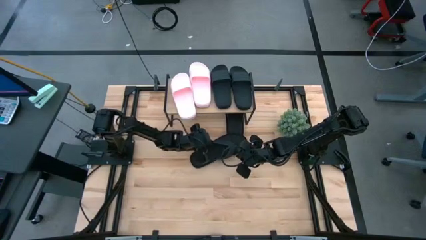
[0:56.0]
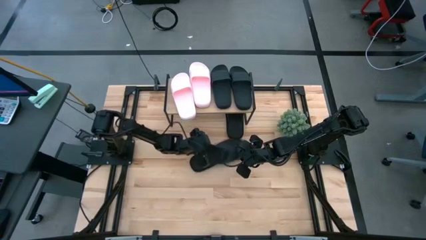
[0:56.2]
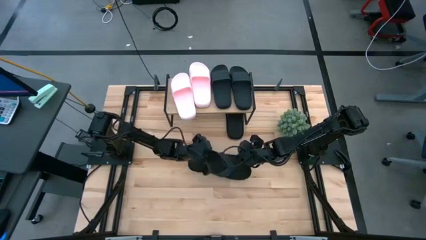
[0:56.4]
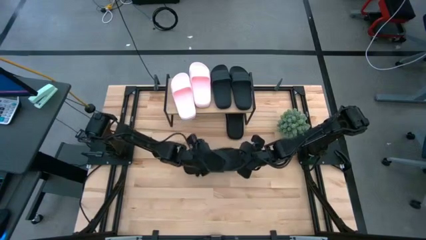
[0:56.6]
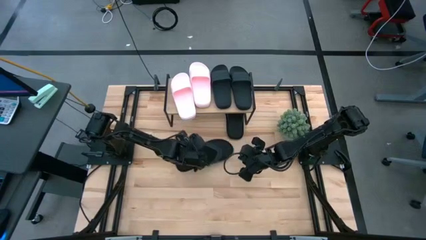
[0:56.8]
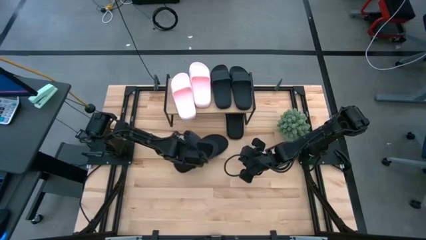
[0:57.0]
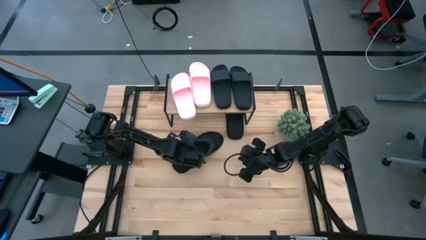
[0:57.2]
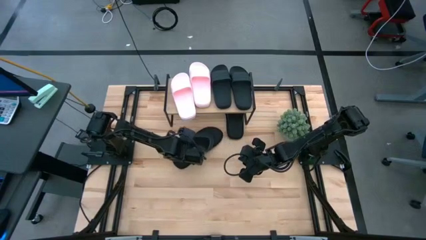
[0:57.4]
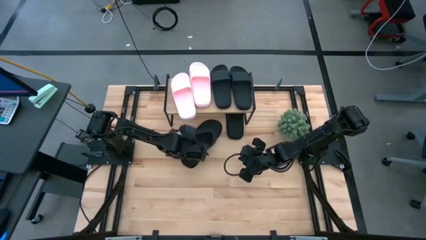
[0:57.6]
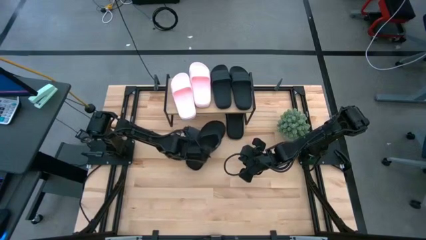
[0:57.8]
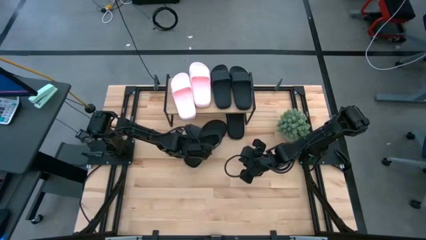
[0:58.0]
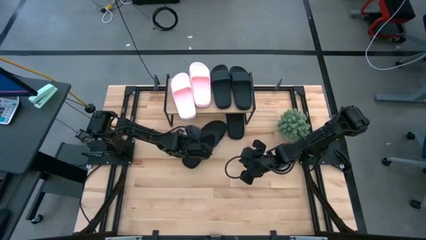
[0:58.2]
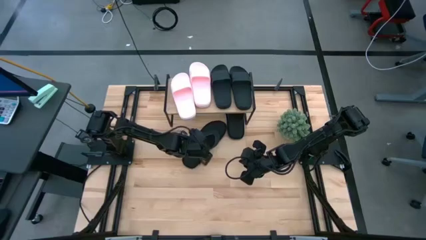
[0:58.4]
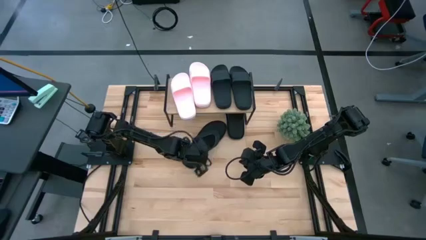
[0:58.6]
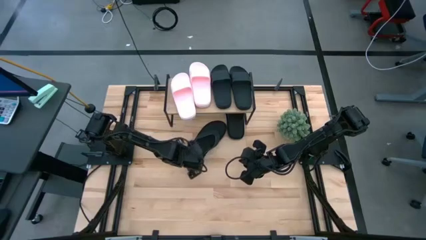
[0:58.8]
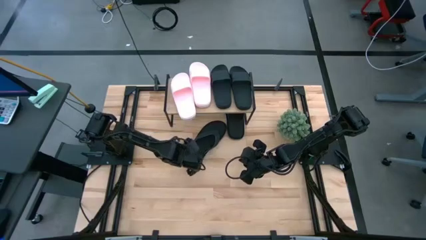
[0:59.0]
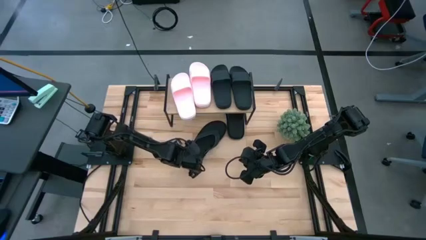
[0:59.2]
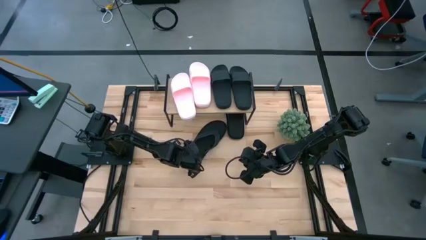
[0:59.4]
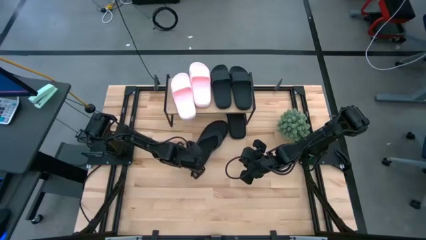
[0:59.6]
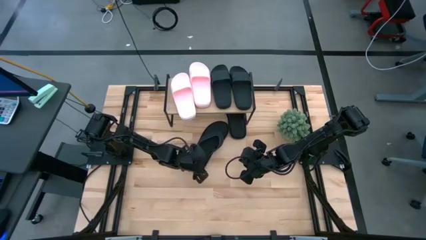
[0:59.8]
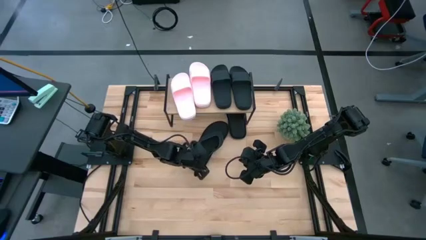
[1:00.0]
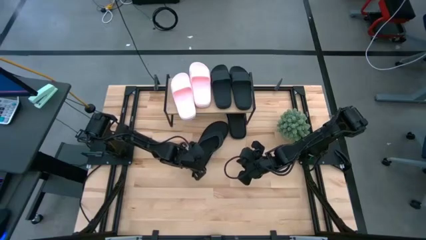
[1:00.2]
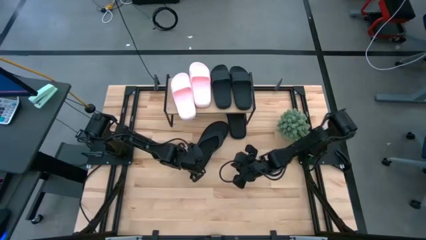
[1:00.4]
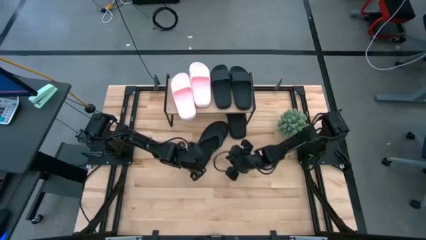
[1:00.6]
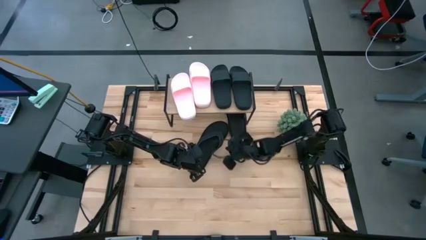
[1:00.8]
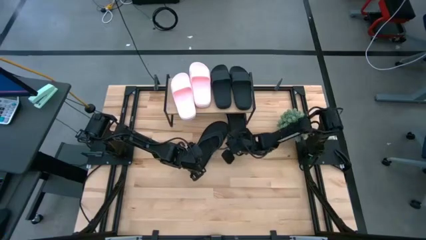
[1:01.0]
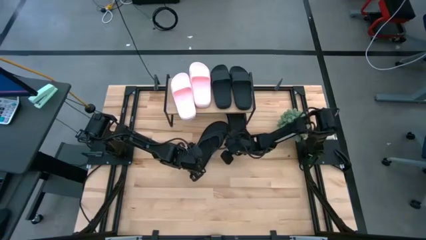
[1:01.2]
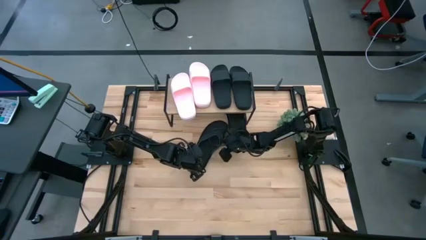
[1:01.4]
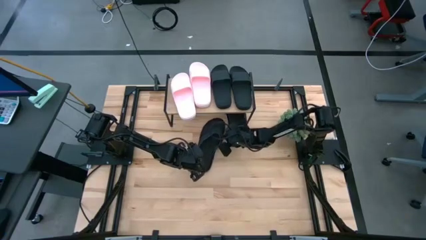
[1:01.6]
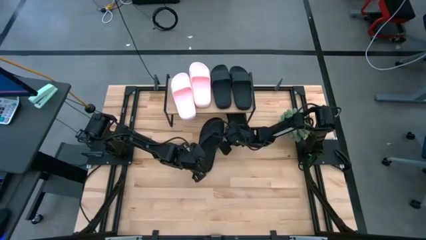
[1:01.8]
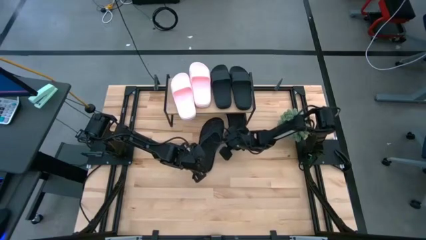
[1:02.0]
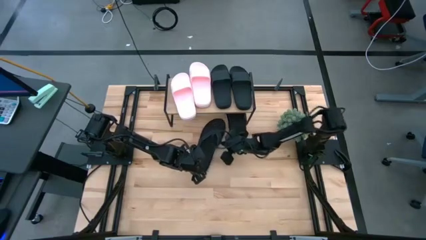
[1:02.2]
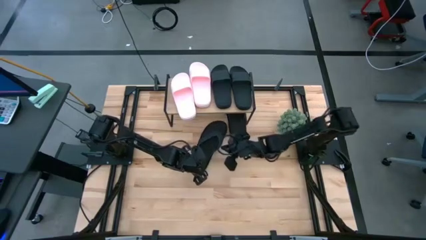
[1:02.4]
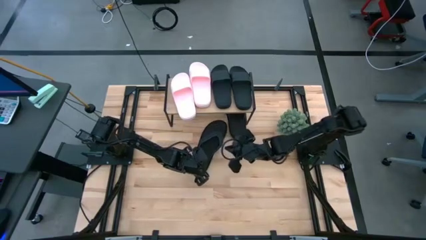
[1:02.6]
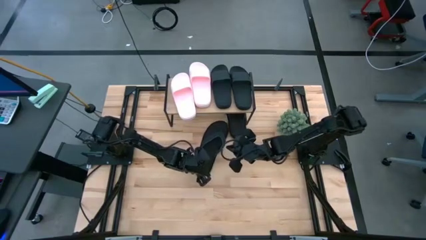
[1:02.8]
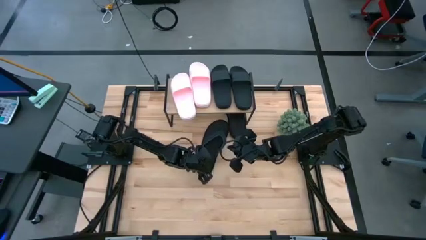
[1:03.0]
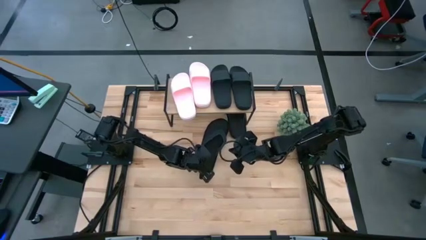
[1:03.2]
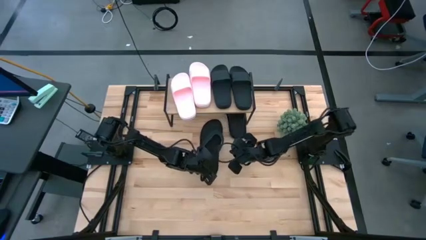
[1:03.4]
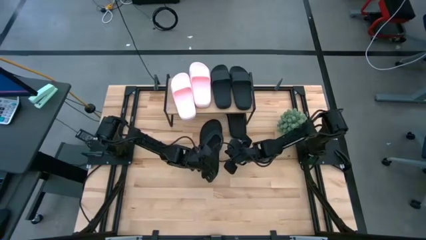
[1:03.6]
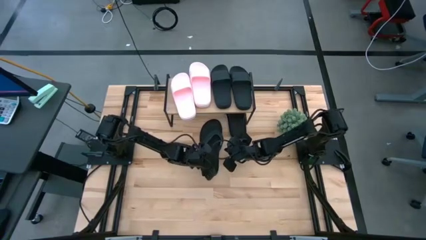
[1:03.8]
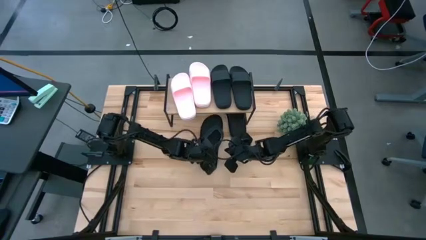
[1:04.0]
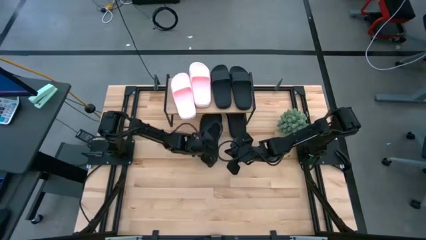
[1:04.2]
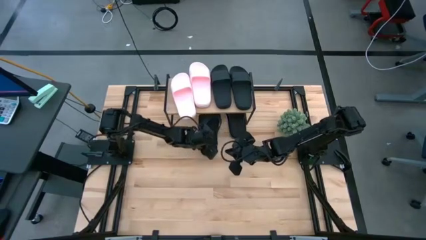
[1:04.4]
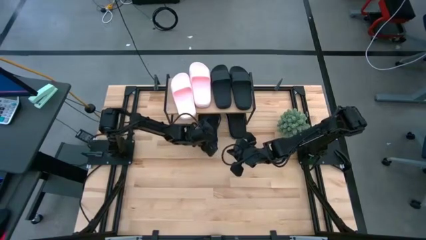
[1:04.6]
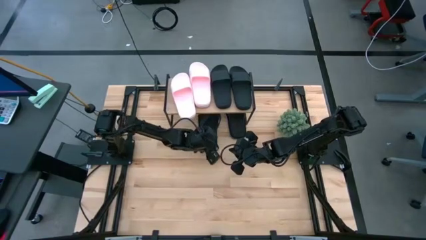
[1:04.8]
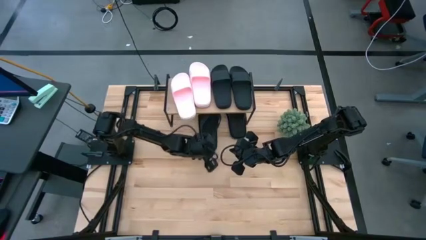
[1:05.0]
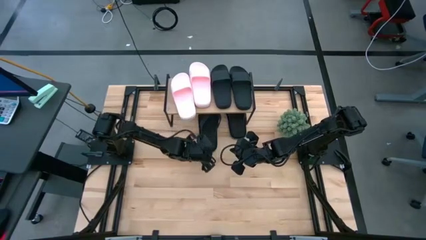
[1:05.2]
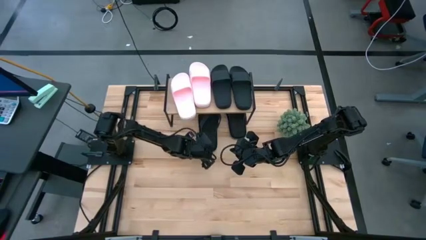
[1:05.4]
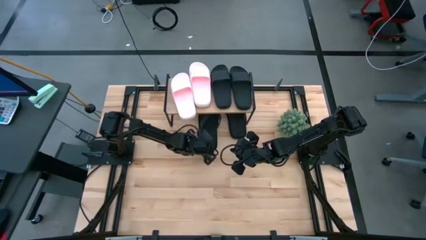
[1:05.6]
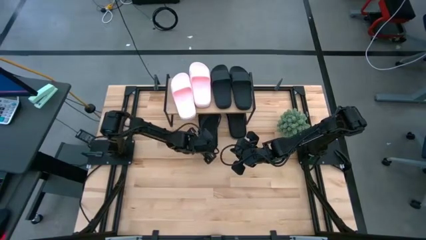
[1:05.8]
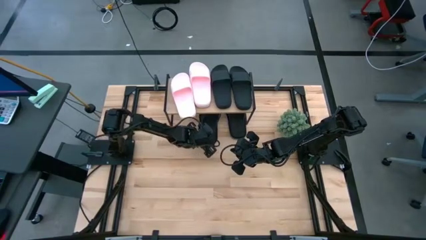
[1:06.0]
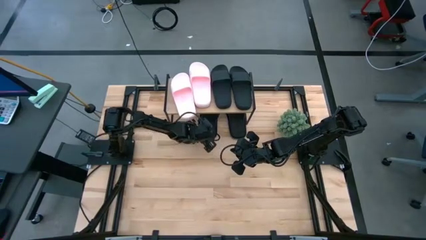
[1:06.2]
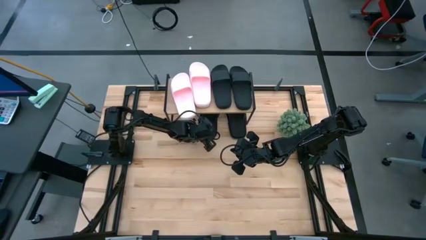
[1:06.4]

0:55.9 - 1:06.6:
Task: Pick and place slides into the shelf
Put the left flip flop under the shelf

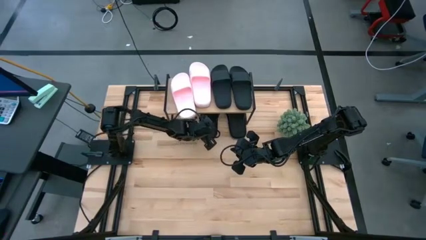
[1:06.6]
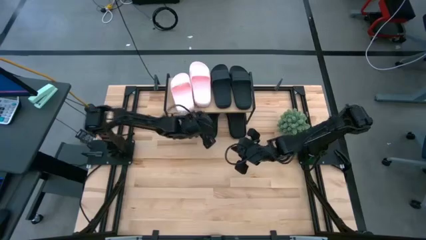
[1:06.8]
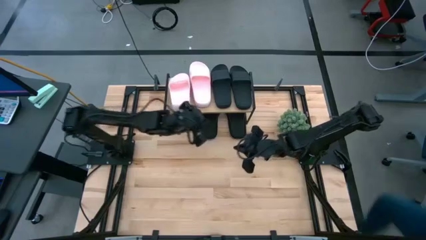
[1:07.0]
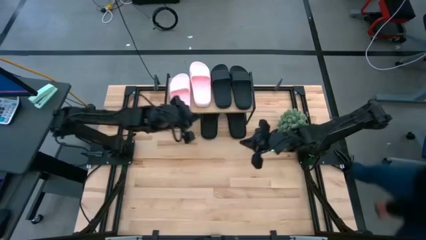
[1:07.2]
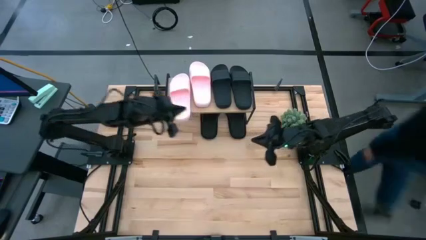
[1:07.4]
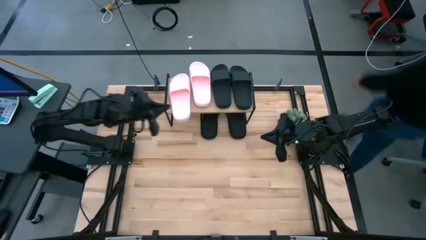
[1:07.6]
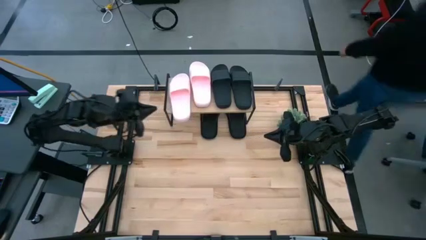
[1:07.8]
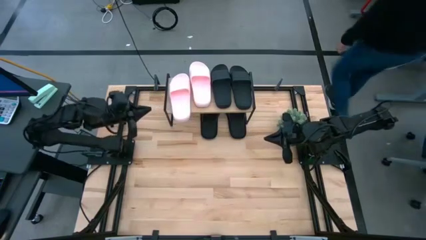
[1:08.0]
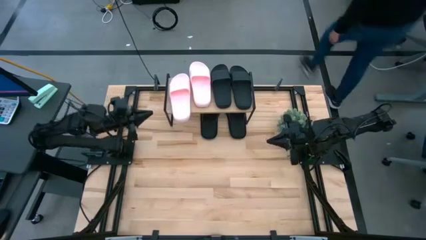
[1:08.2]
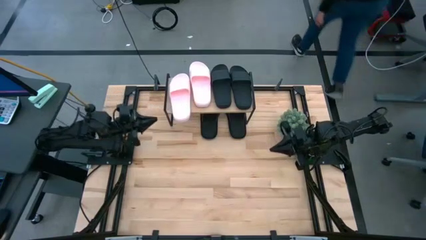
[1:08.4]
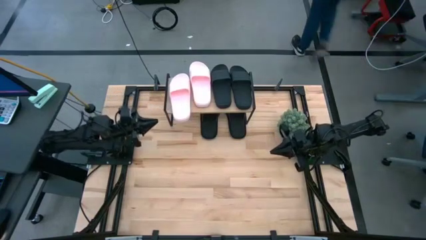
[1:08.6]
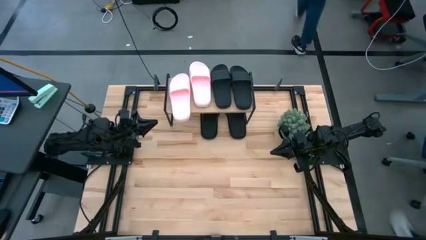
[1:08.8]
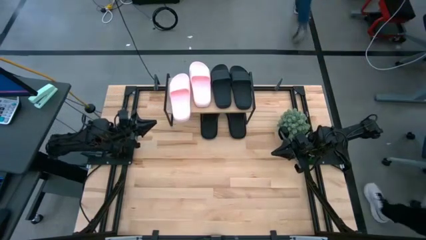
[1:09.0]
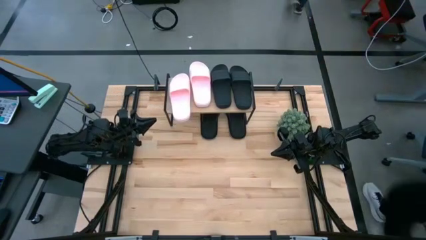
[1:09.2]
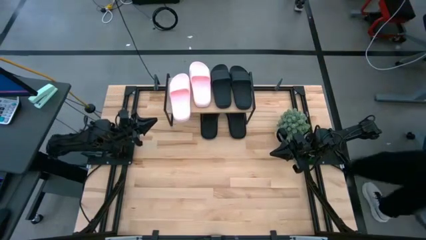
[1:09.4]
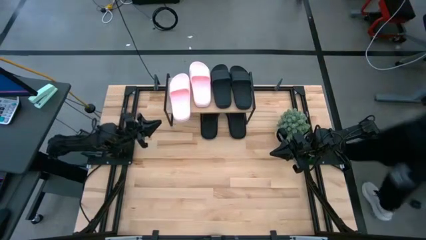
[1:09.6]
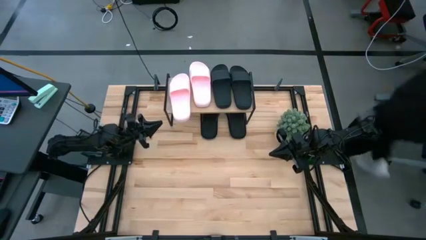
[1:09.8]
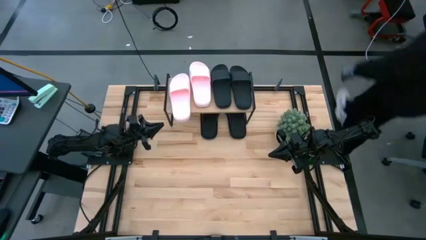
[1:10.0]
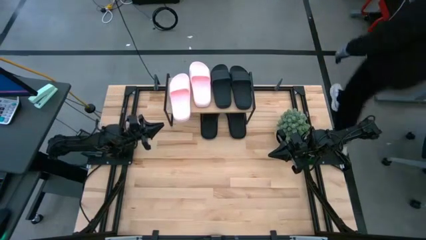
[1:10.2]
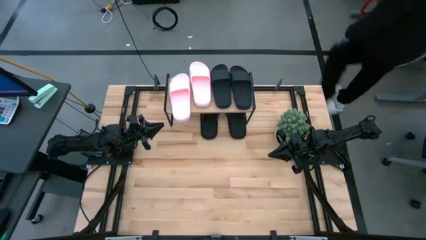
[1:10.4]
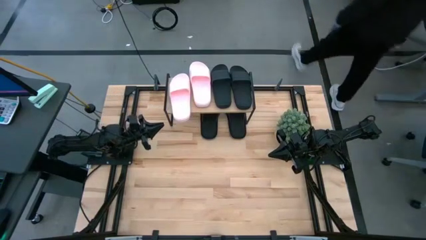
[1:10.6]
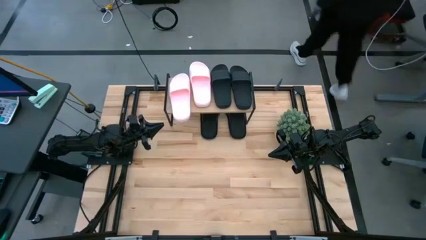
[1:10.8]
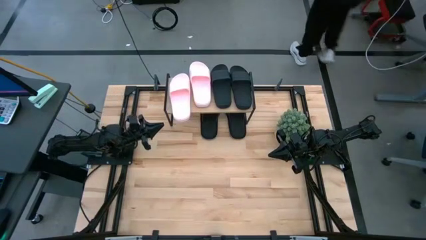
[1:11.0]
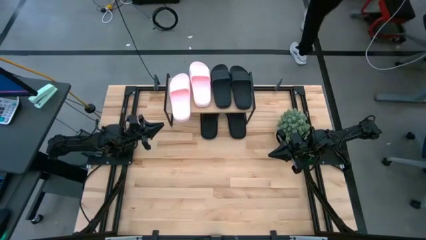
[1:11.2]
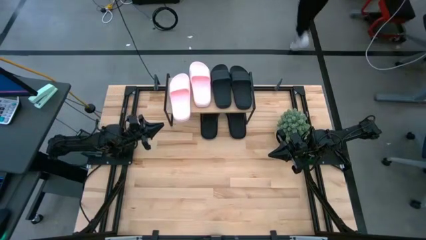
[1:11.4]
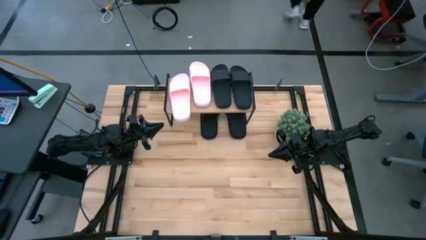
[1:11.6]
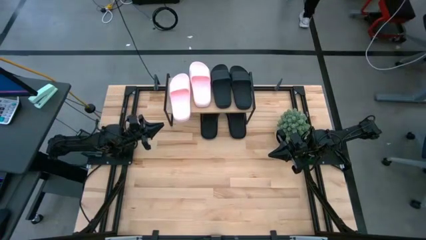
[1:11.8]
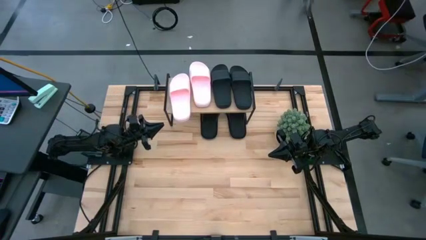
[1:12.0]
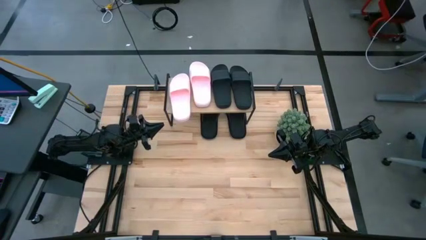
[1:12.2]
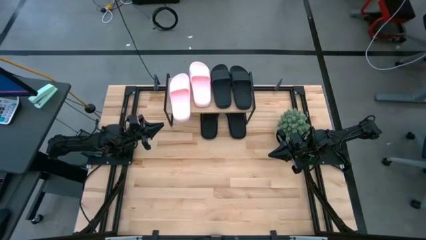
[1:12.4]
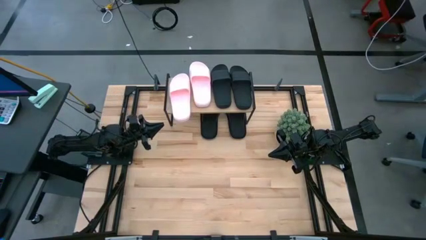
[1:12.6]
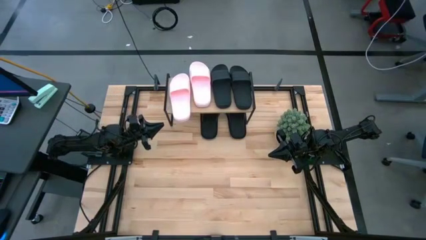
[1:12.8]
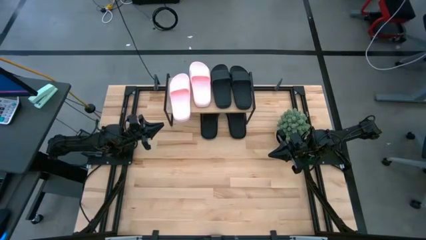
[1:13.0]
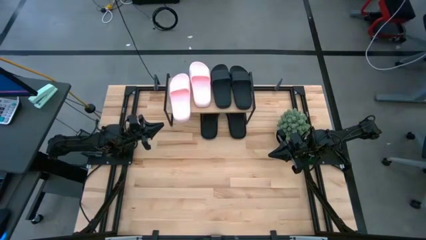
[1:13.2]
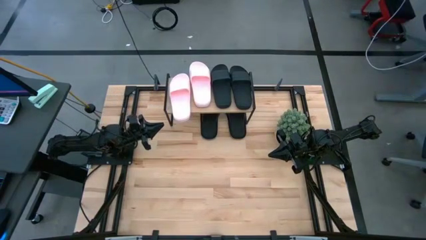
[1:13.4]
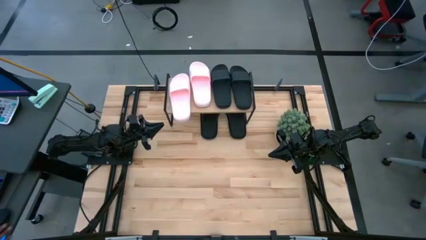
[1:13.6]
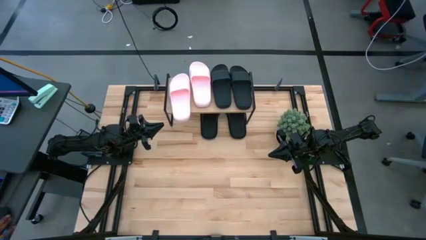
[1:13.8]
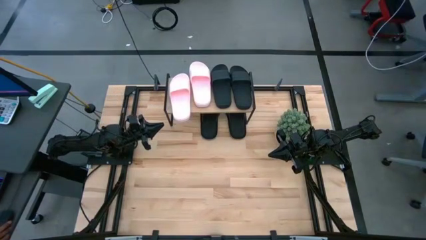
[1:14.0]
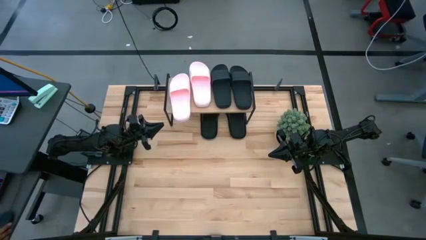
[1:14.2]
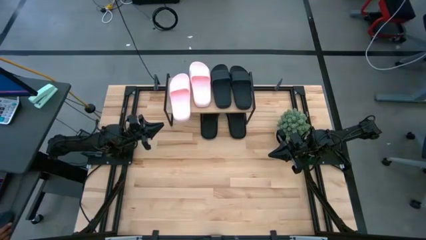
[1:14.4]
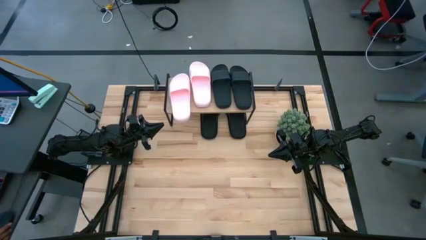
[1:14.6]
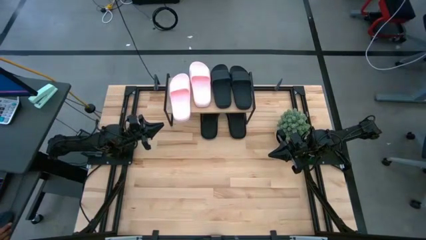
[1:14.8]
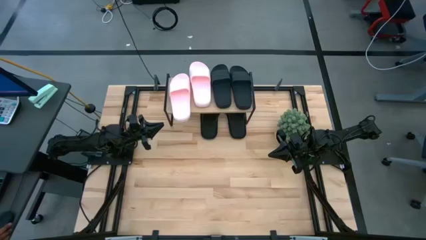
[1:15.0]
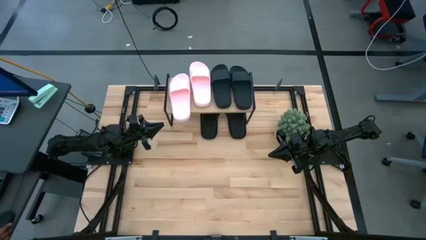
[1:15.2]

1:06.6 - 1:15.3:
Return to home position
